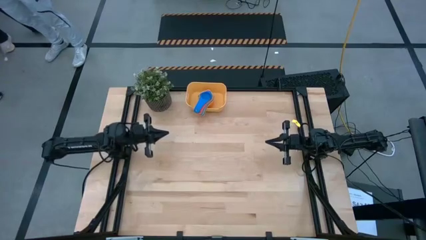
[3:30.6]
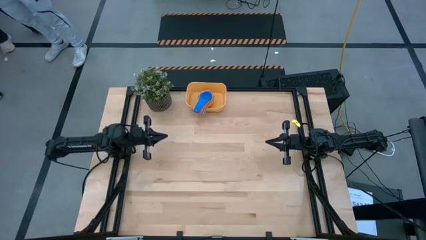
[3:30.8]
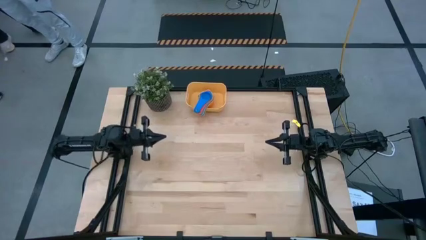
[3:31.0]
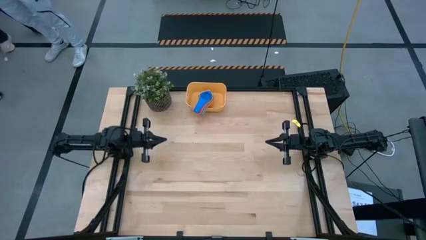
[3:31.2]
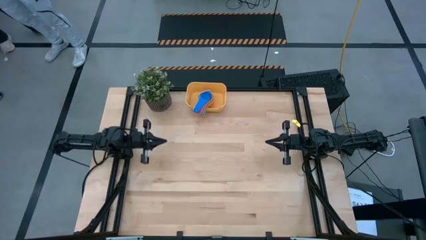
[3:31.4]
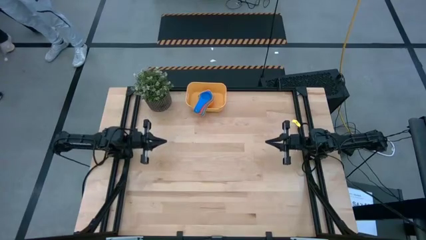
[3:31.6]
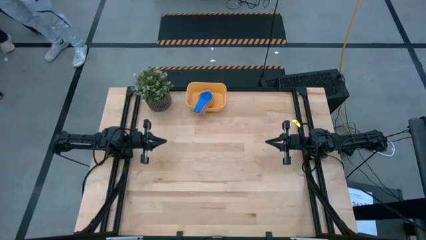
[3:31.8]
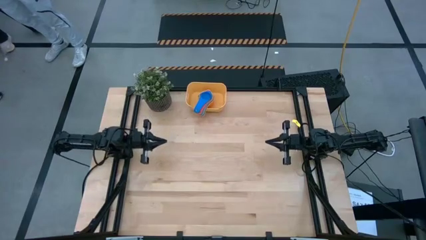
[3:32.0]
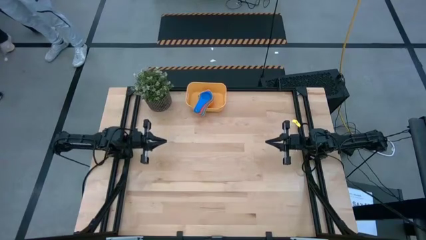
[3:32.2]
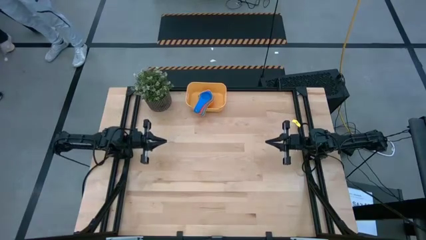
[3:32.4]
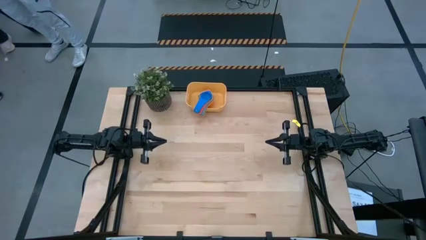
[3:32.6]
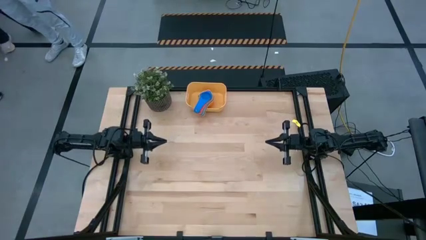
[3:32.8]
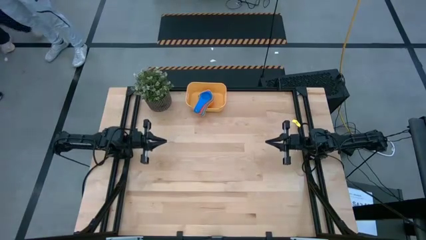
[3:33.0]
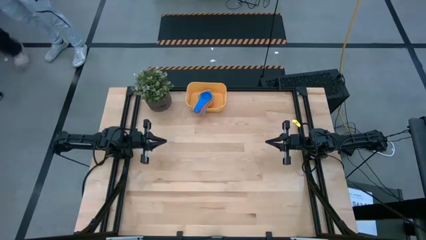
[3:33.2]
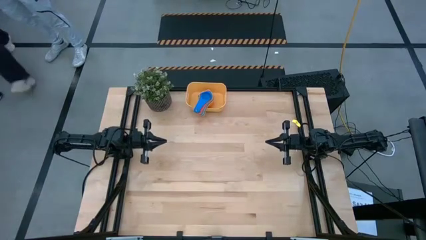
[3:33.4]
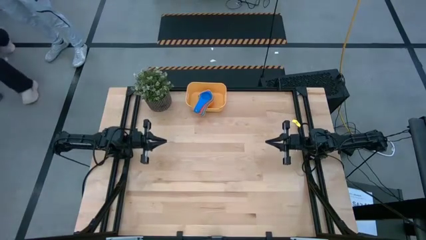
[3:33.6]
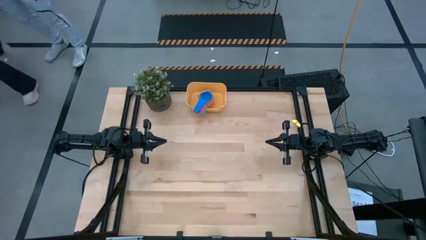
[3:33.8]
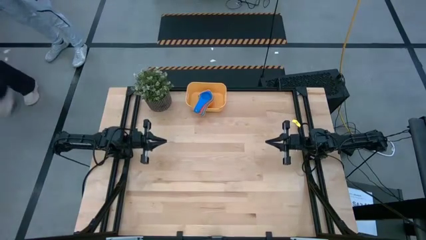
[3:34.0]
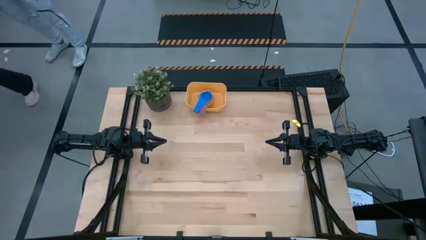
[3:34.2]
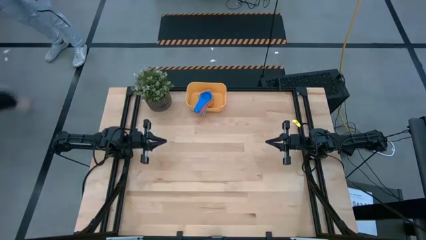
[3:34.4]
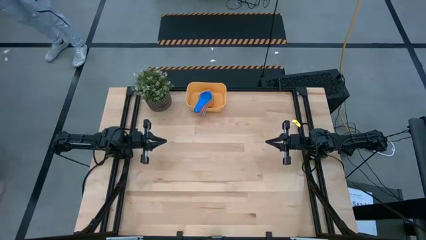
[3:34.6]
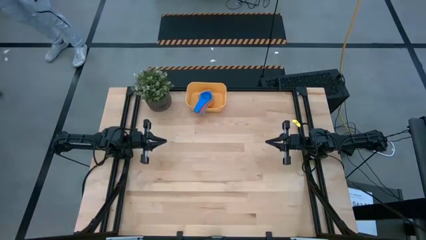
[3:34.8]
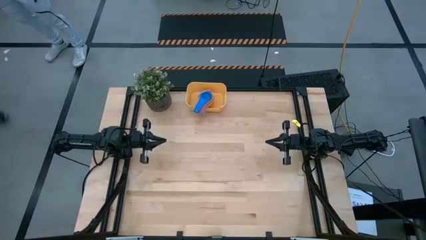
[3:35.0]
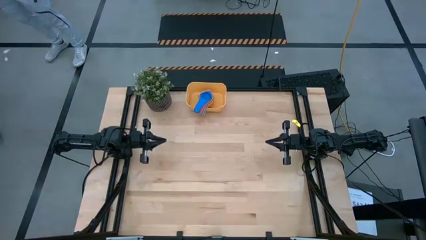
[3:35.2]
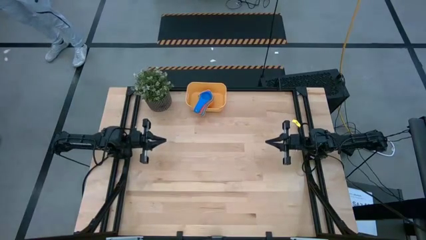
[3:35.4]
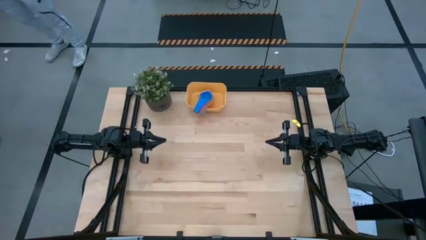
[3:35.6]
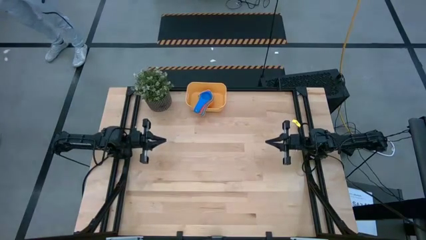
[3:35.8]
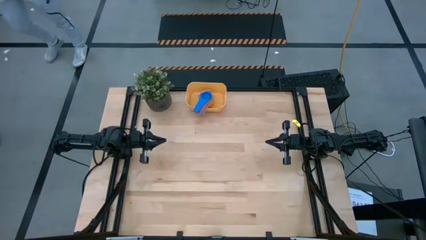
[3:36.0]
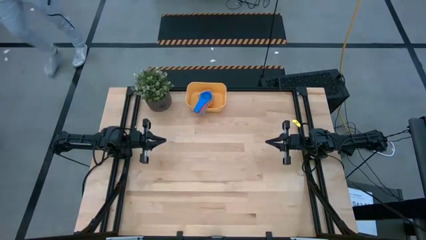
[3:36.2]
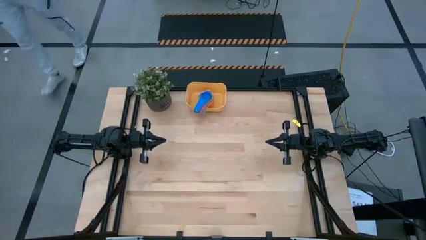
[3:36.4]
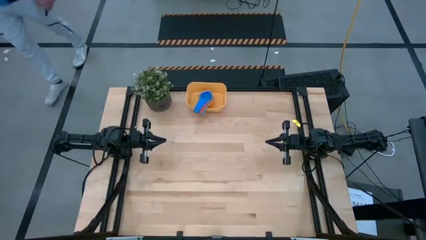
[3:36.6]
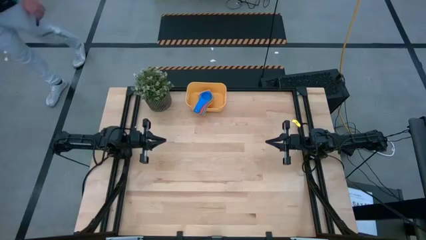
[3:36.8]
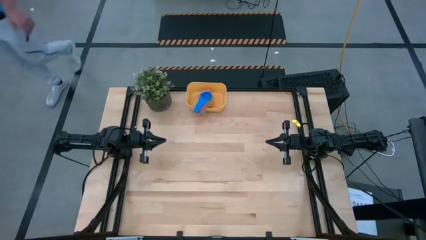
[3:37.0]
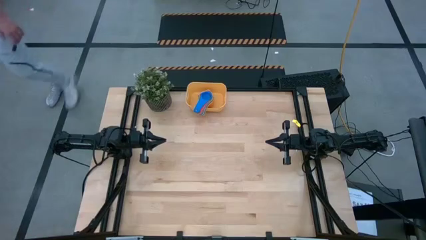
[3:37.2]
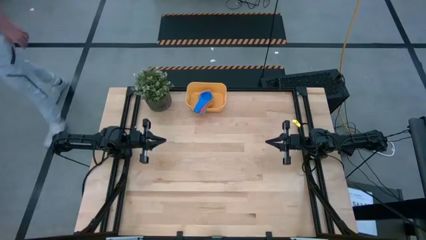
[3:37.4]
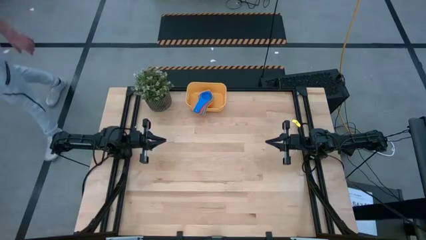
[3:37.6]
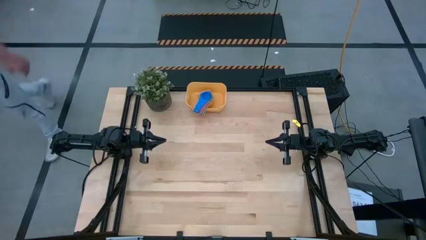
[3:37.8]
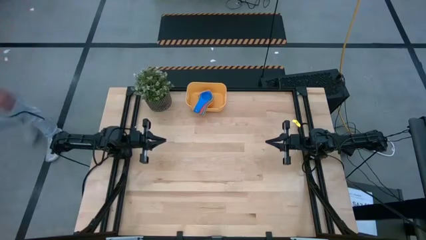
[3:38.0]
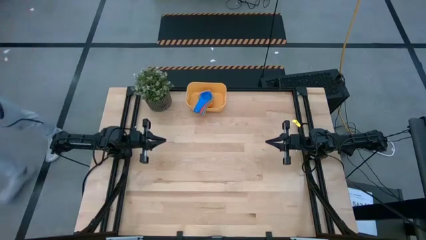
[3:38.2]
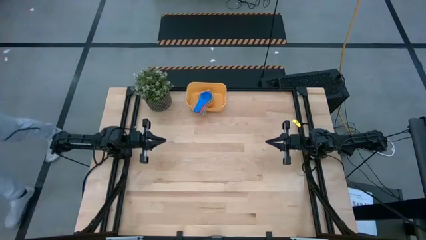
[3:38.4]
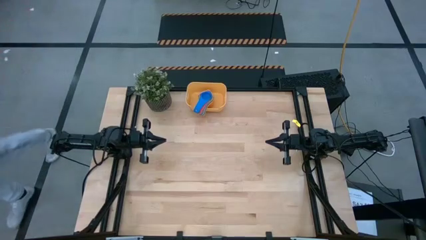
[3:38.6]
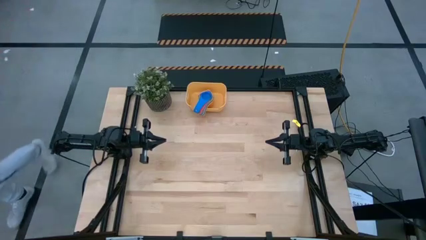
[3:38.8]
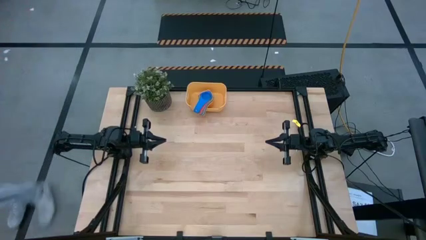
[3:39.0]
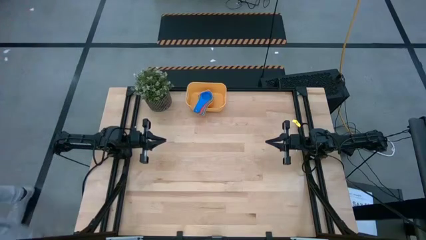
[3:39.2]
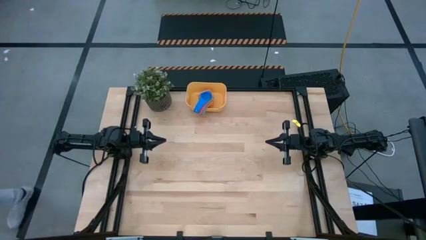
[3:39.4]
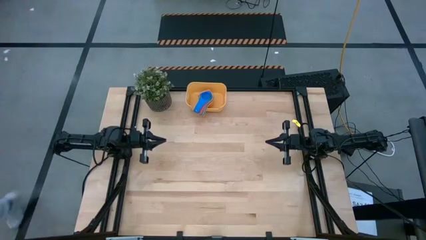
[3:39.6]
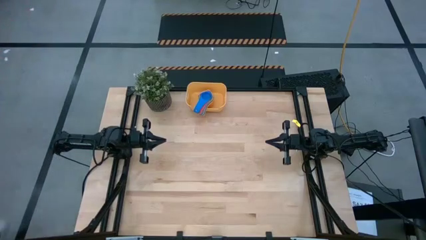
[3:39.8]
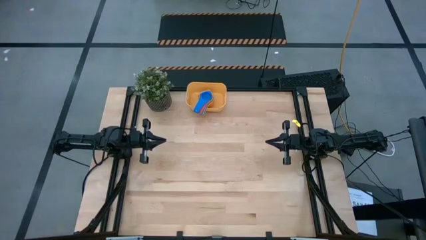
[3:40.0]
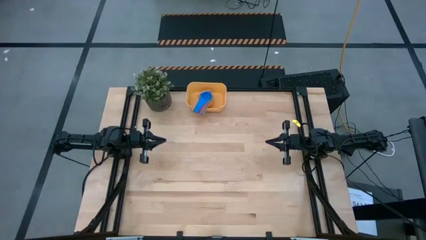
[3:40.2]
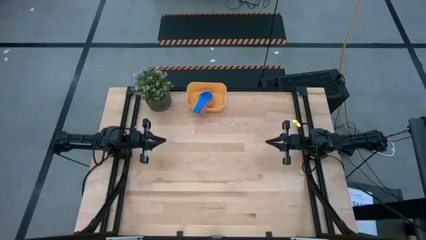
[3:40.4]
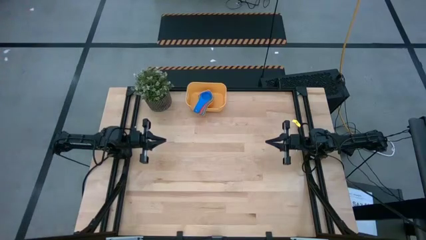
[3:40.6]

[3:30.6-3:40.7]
Task: Nest measuring cups in basket
Return to Home Position

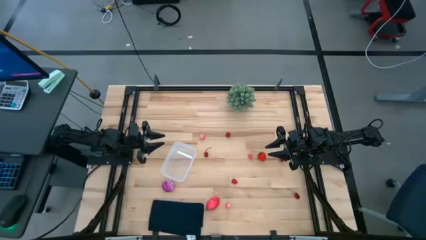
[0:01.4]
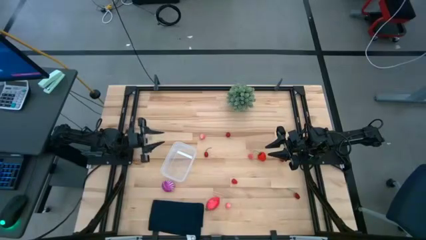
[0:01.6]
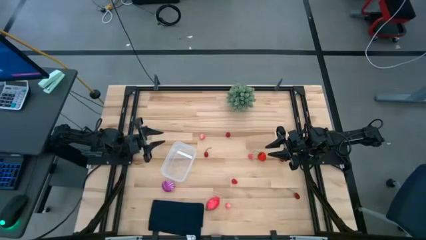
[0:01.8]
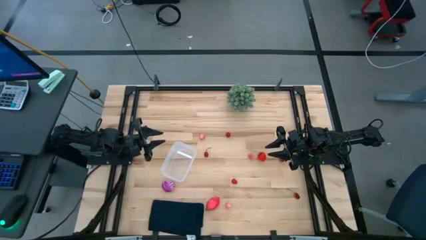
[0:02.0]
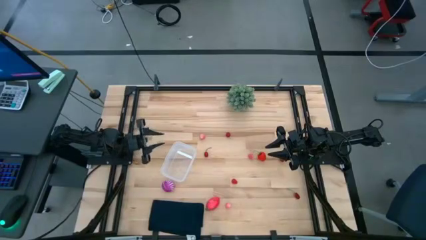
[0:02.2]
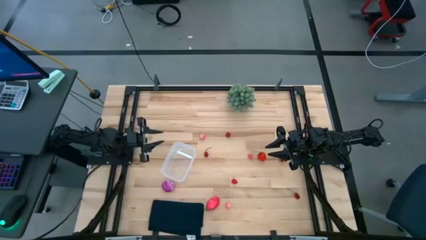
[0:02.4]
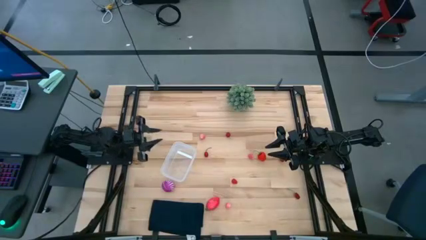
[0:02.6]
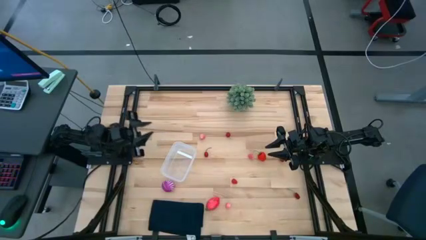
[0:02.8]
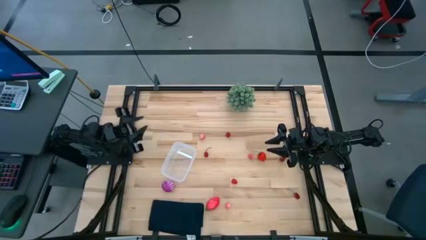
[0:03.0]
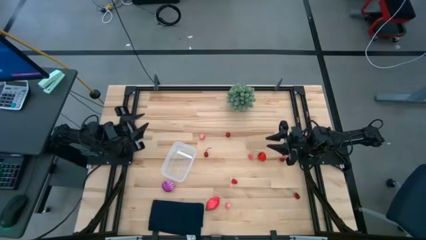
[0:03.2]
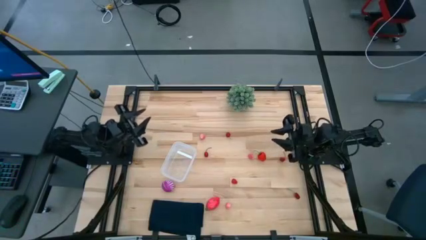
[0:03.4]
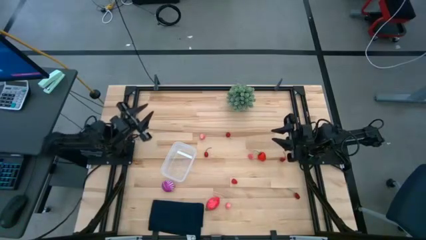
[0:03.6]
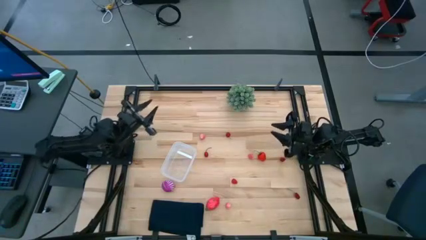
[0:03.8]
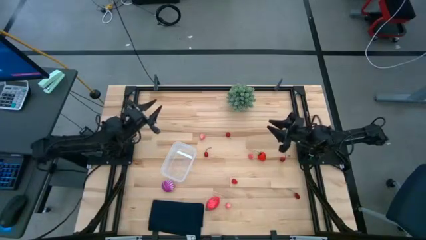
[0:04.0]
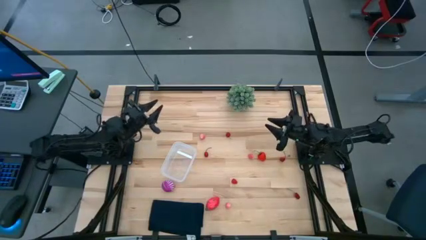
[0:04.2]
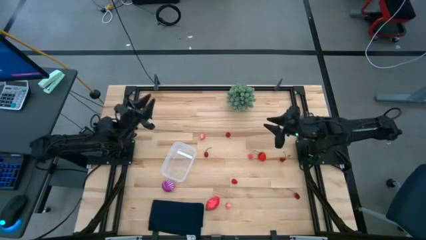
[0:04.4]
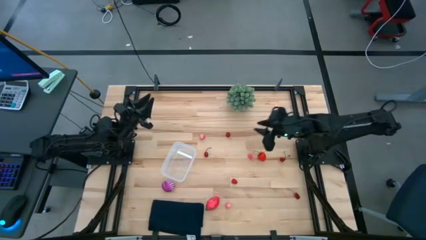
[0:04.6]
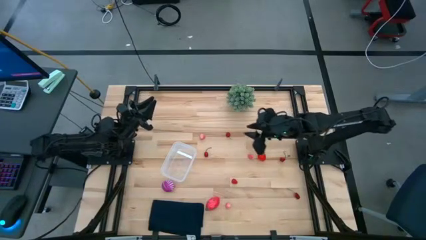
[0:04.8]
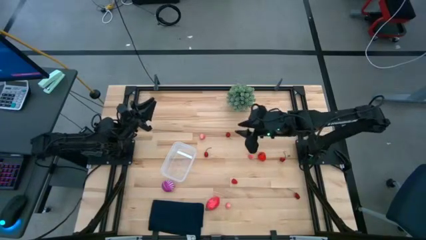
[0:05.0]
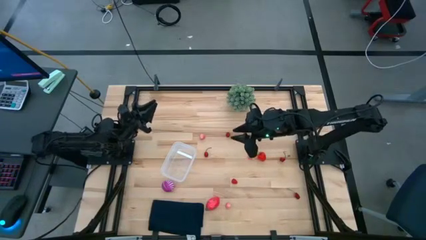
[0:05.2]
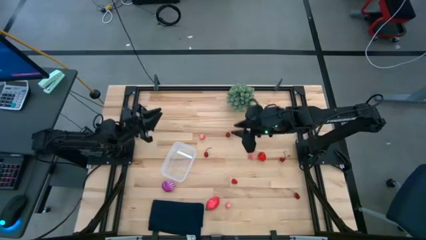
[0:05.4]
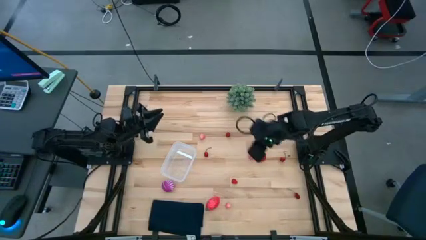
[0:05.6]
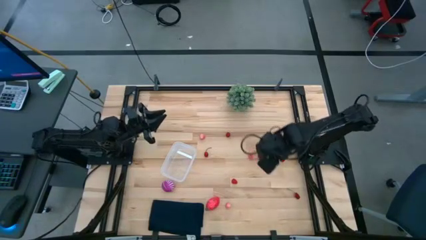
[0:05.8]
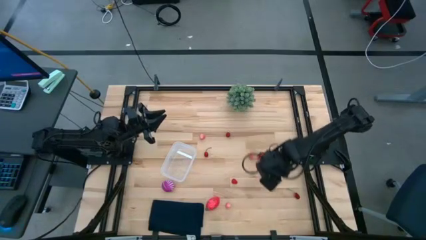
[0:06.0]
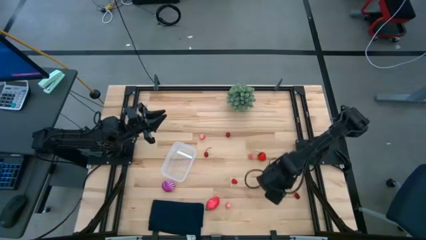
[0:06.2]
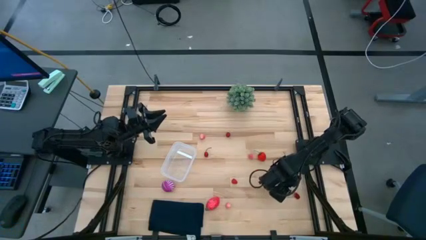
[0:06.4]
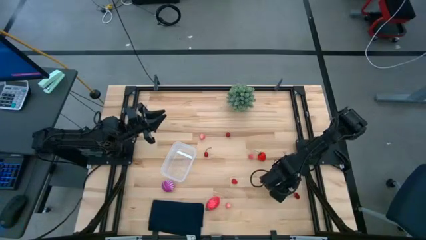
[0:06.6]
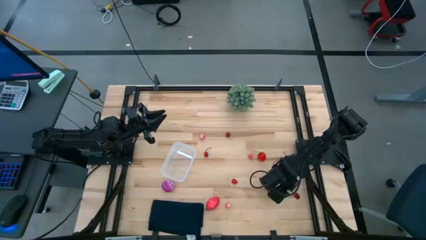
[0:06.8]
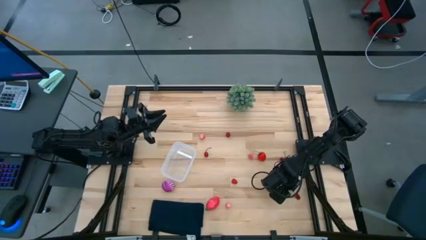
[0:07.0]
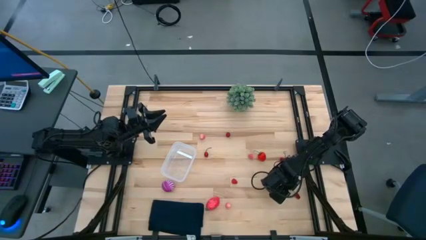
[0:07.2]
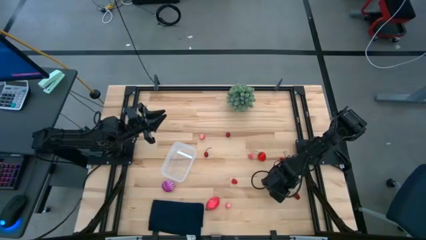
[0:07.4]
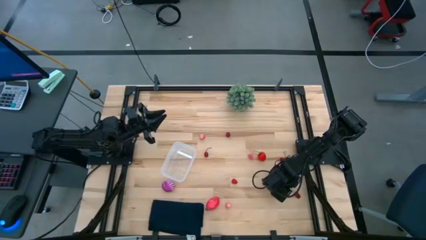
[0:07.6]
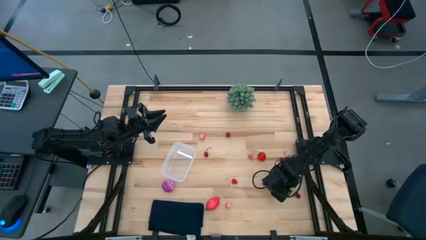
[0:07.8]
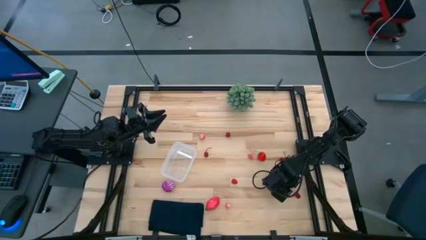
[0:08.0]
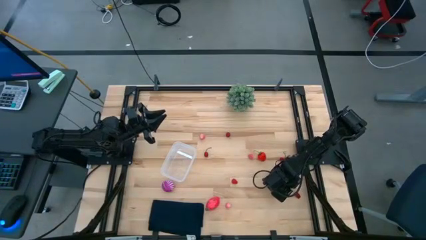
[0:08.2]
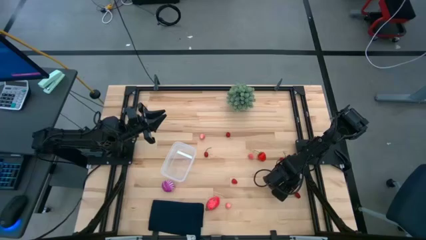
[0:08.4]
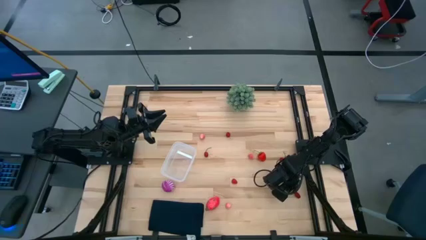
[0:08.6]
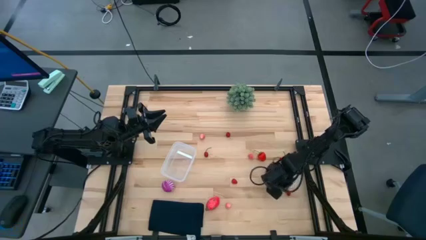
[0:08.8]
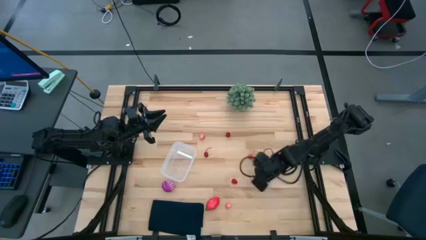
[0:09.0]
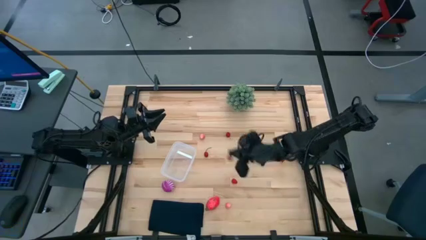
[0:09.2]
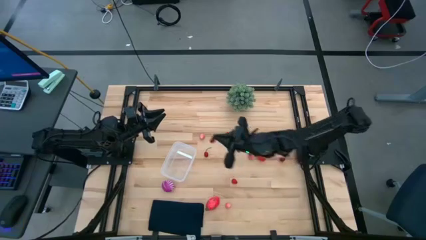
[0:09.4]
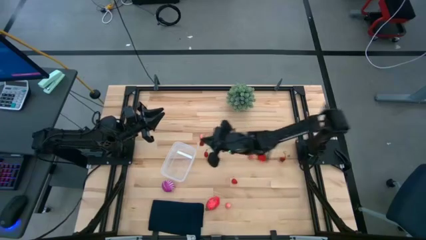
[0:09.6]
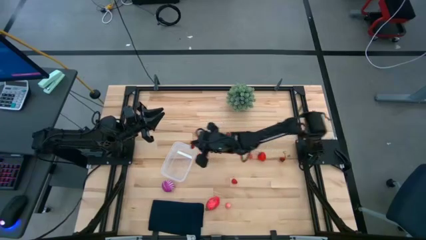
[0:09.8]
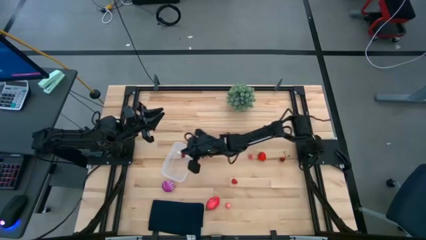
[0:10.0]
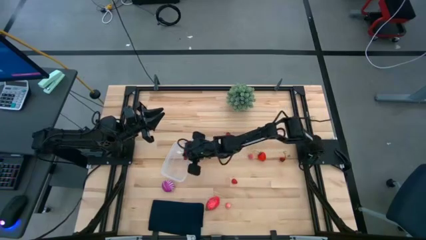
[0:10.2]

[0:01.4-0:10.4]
Task: Pick and placing Produce into tupperware
Put the red cherry into the transparent bin
